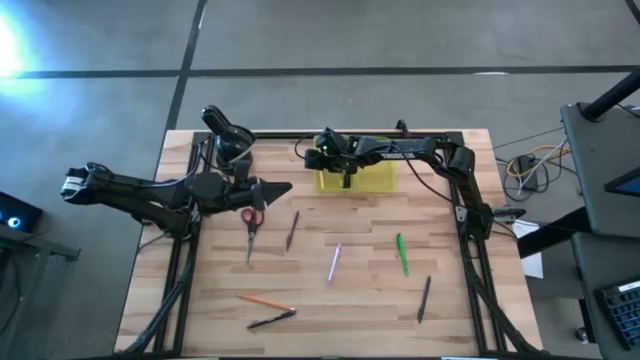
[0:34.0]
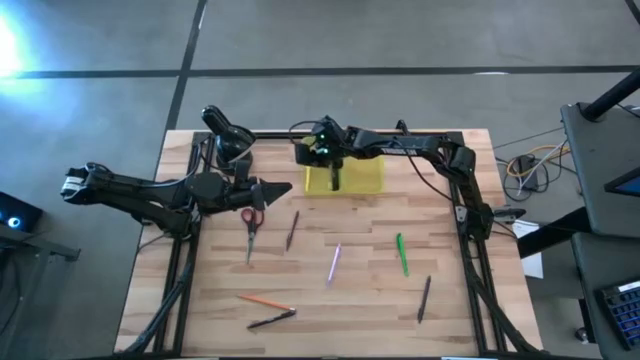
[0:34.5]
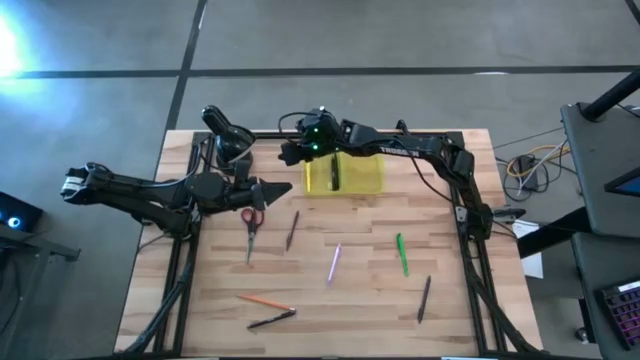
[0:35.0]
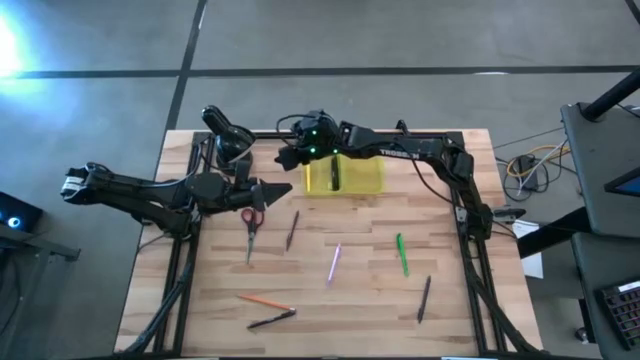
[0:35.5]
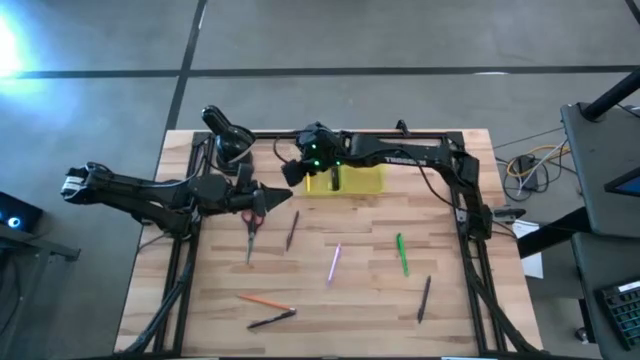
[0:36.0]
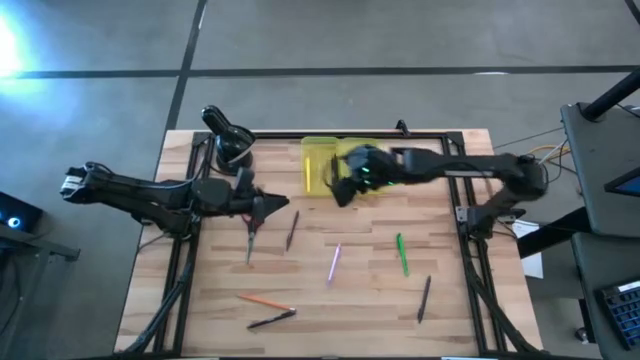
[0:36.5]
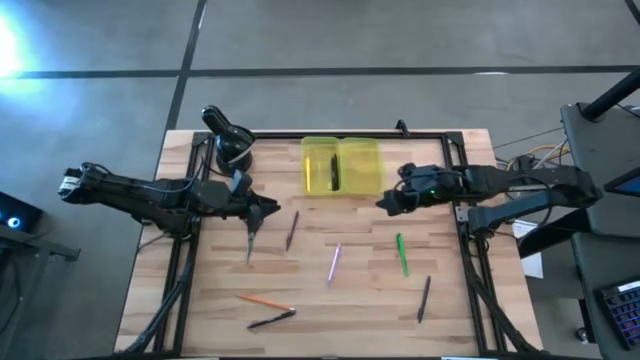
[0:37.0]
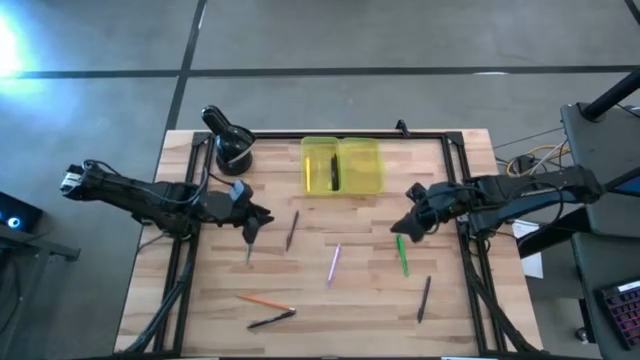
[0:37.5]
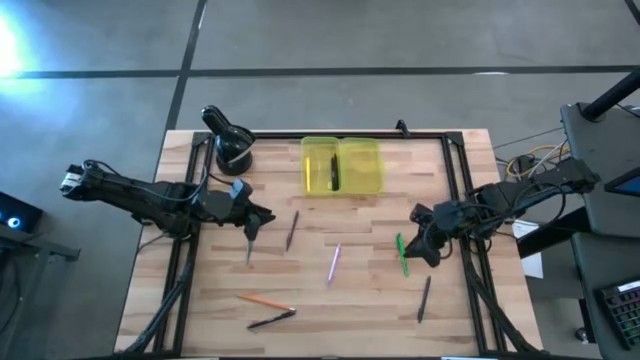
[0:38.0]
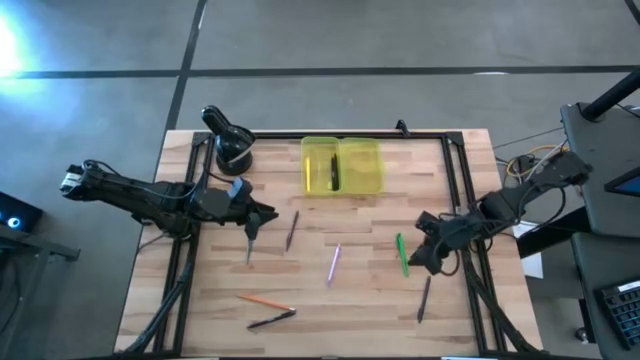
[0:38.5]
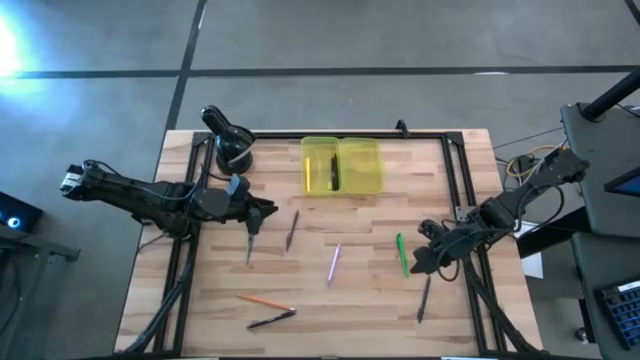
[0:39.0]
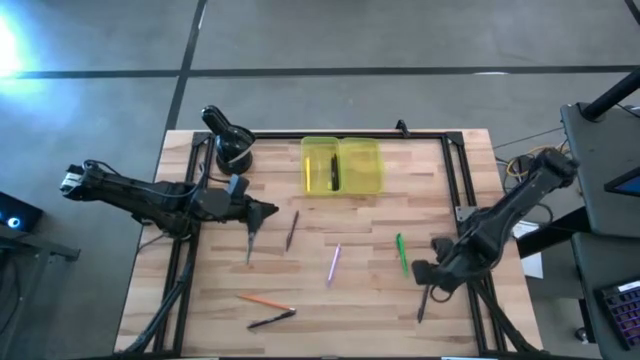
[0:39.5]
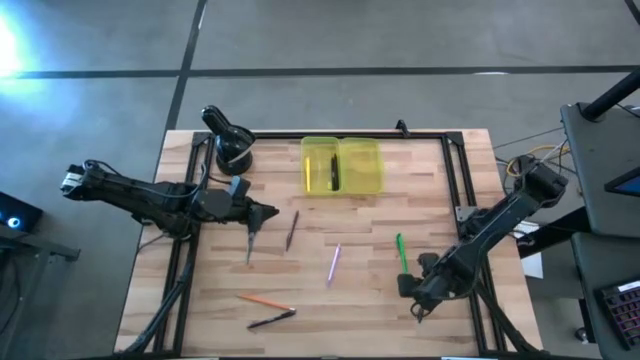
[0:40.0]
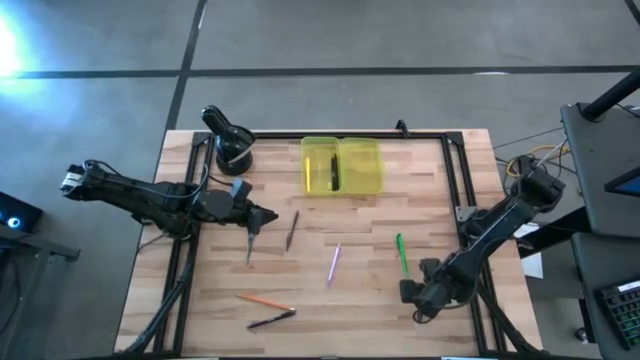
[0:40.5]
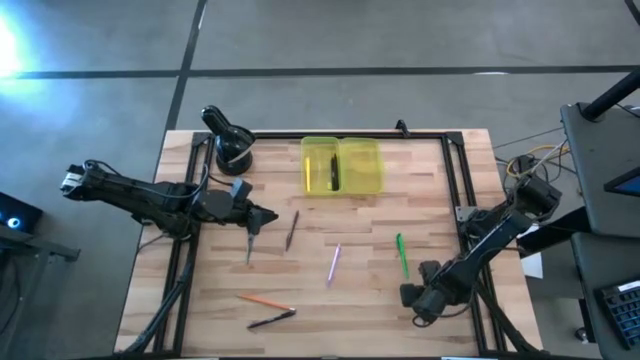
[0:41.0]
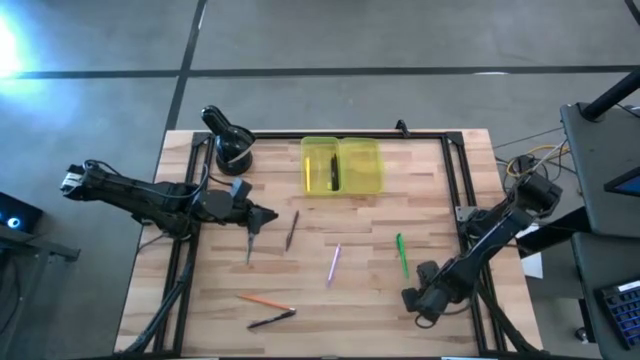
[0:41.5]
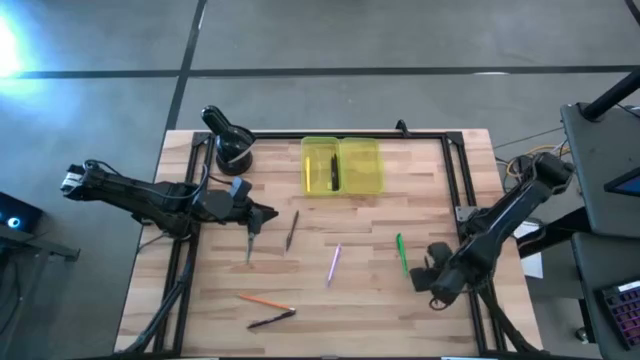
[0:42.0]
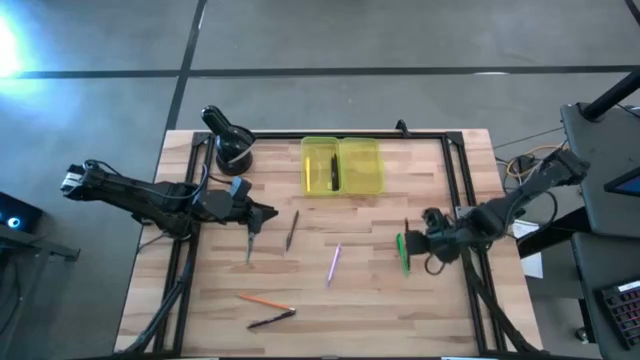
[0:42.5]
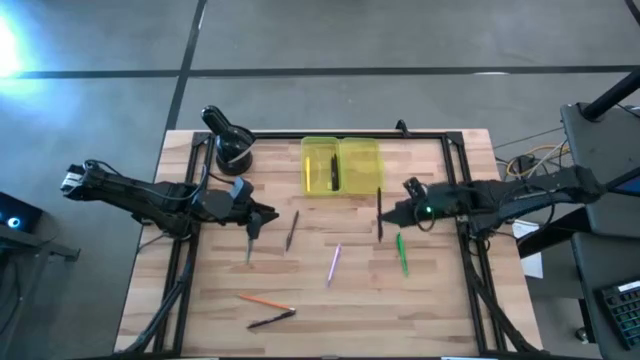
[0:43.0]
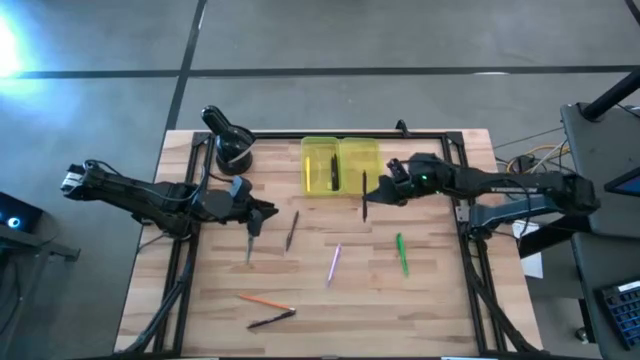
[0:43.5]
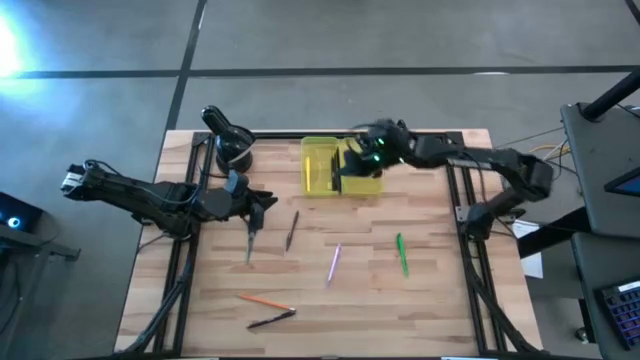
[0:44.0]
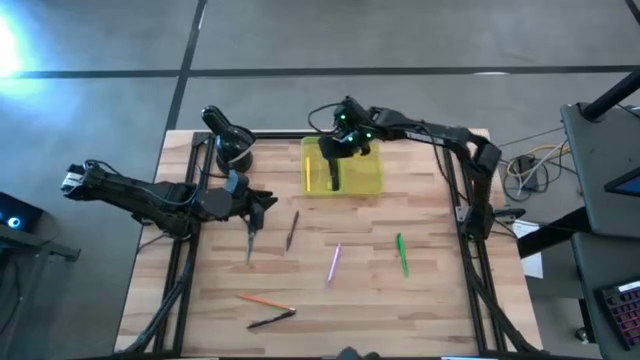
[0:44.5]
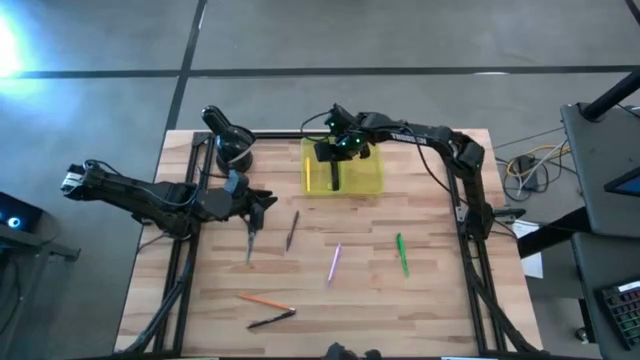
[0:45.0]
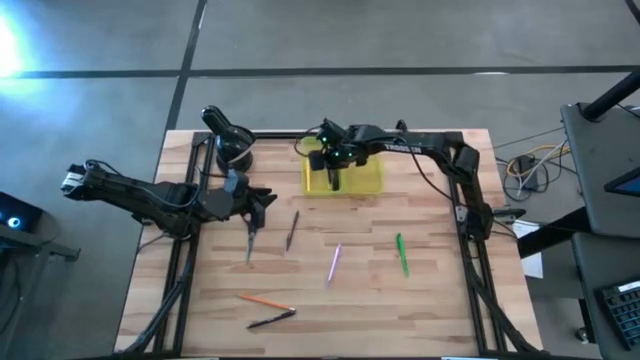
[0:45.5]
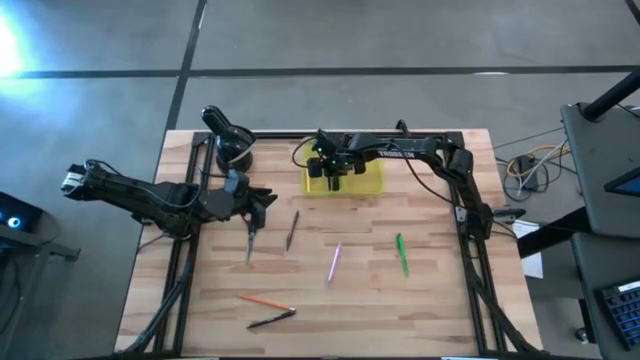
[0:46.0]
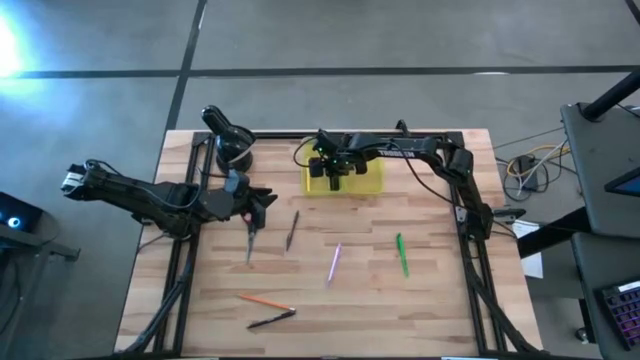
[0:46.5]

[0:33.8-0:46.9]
Task: Pick & place school supplies into a supply box
Put the black pen into the yellow supply box

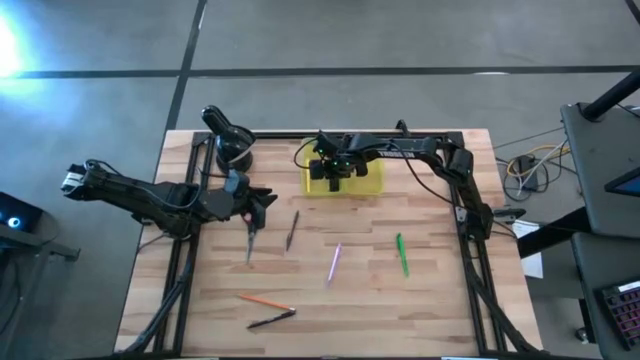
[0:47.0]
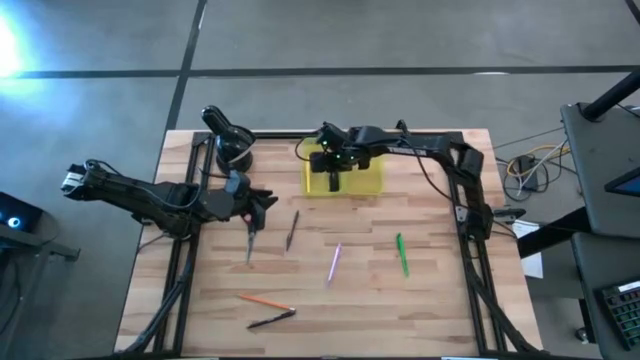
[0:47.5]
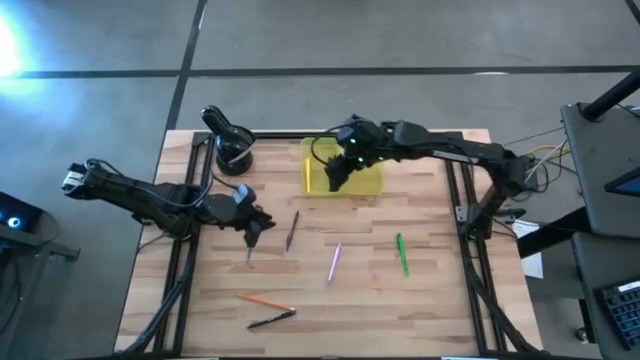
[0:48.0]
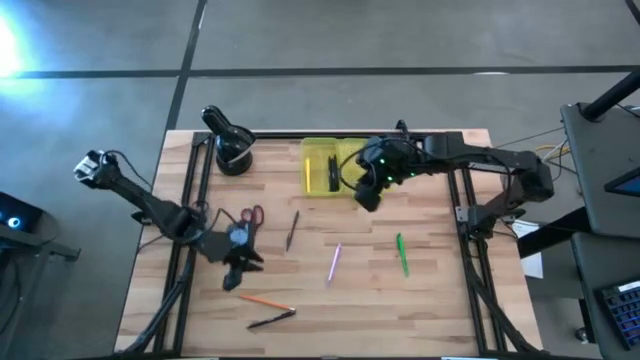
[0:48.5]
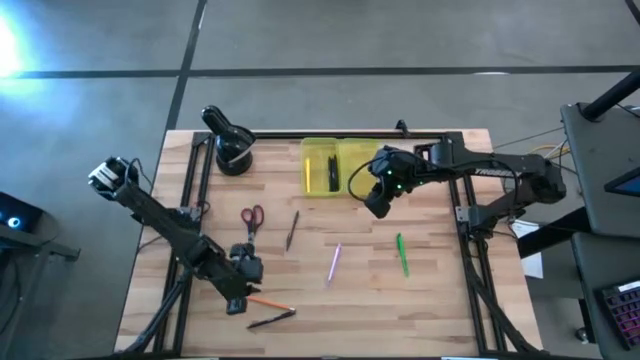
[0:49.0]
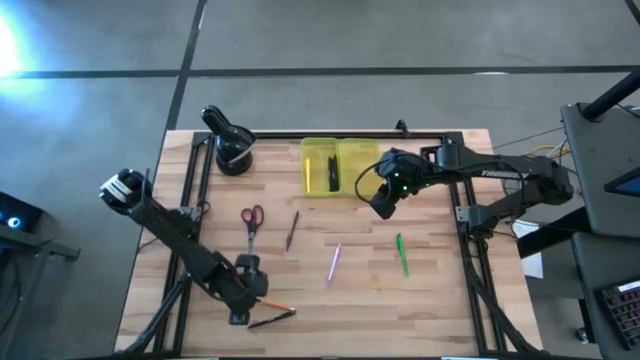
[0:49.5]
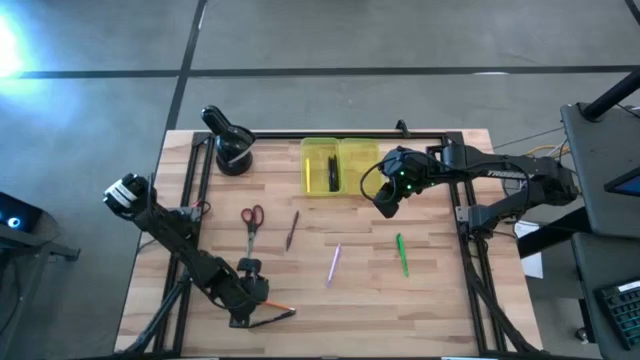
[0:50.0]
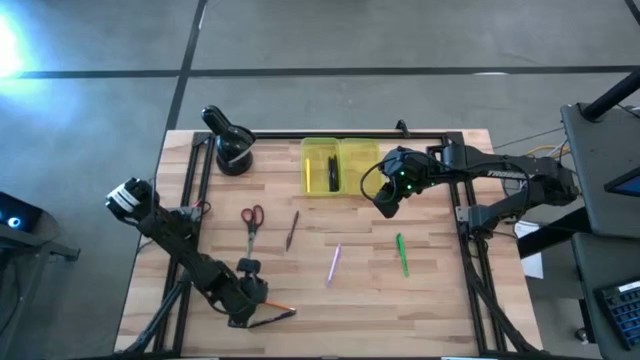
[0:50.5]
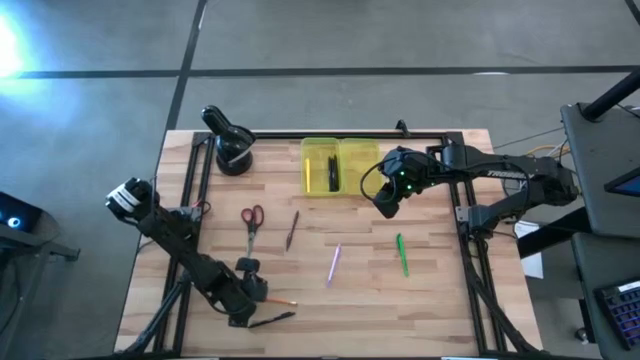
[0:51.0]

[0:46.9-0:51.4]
Put the orange pencil into the yellow supply box

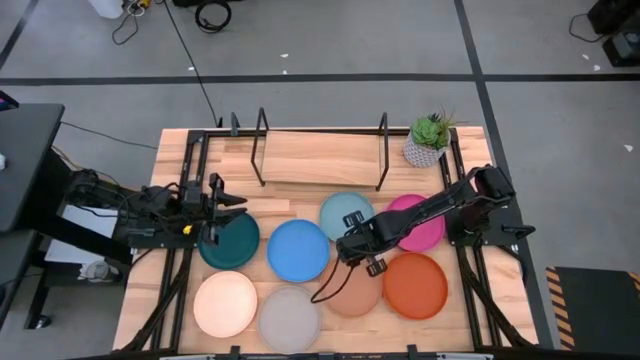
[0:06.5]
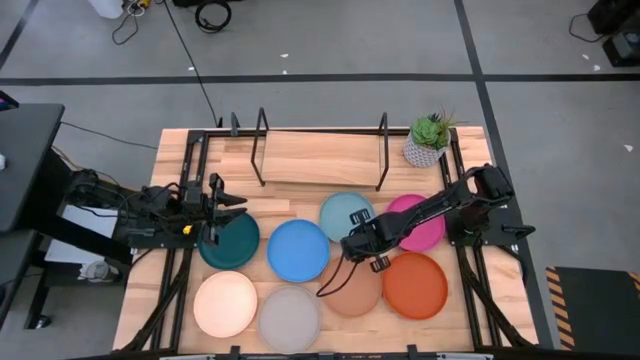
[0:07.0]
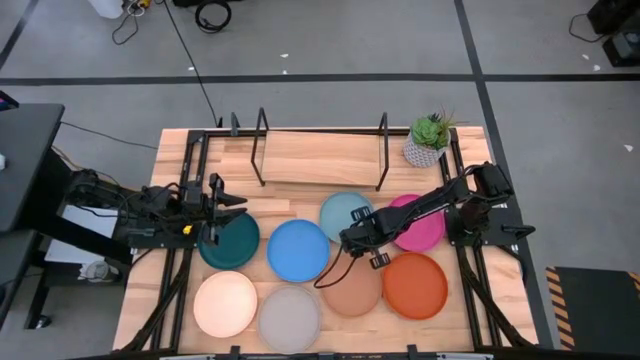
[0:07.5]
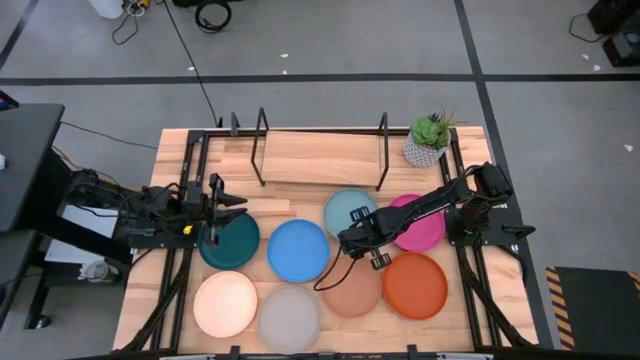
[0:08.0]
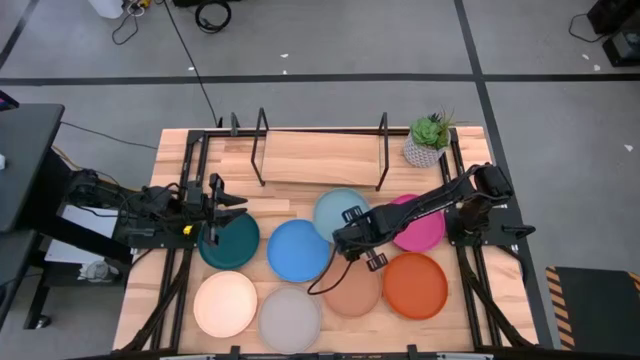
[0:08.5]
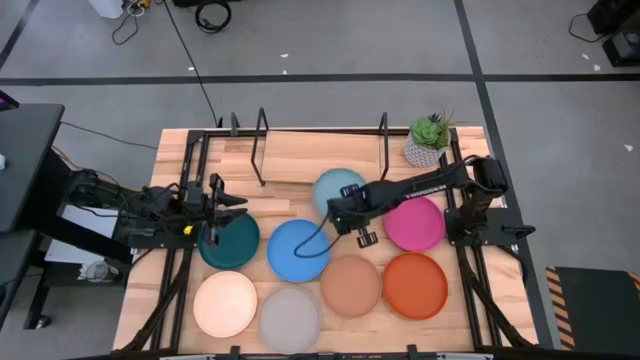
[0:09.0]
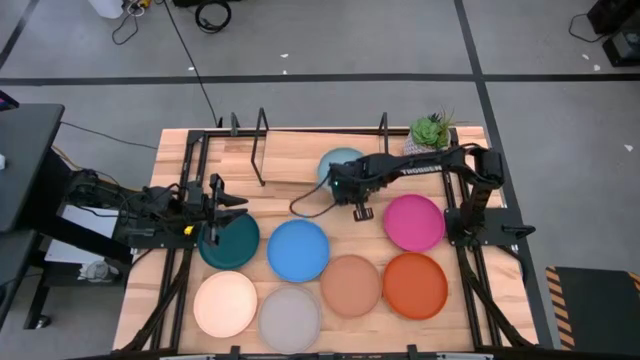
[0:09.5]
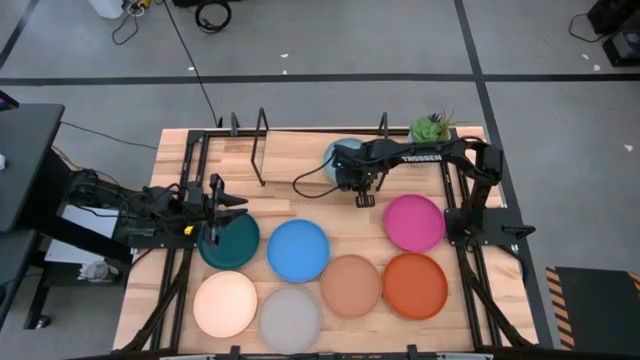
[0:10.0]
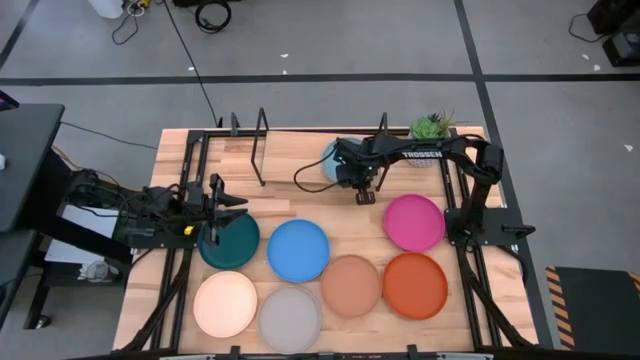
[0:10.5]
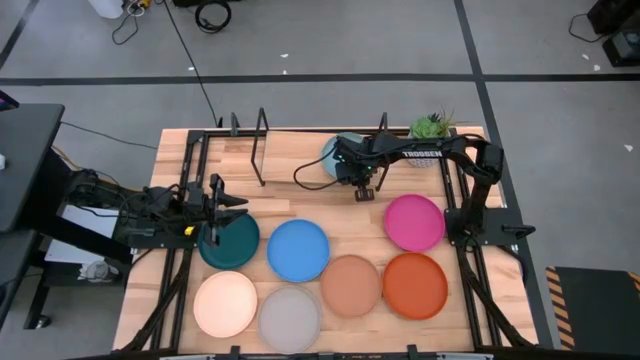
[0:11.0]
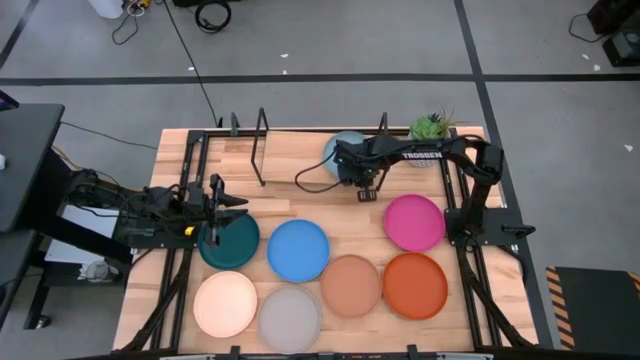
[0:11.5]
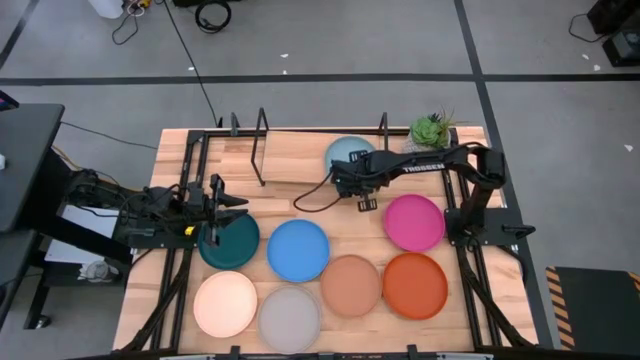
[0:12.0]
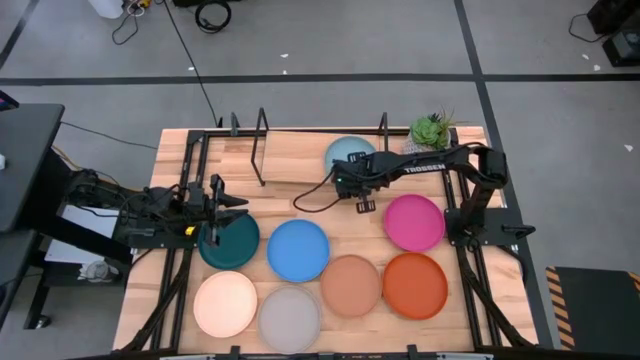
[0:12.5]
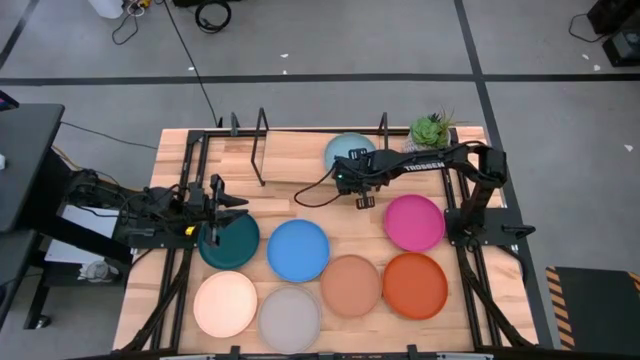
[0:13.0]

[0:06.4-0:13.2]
Task: Place and stack plates onto a shelf
Put the light blue plate on the shelf
